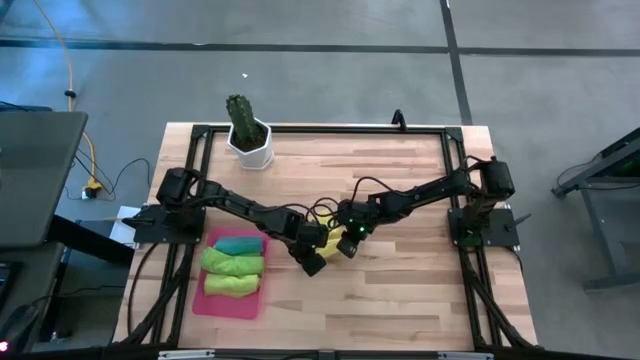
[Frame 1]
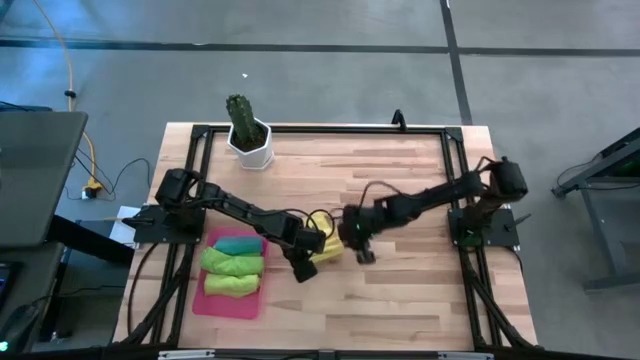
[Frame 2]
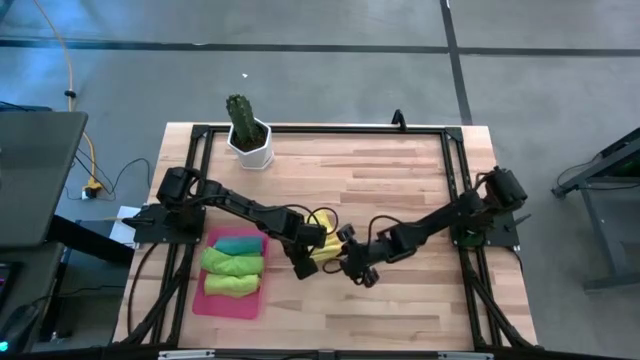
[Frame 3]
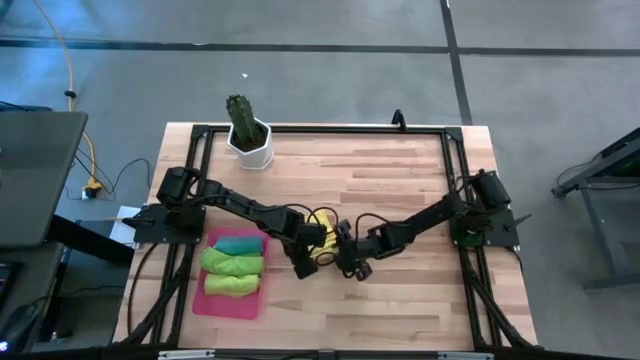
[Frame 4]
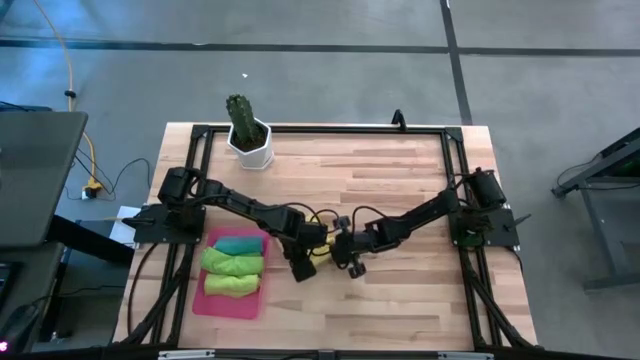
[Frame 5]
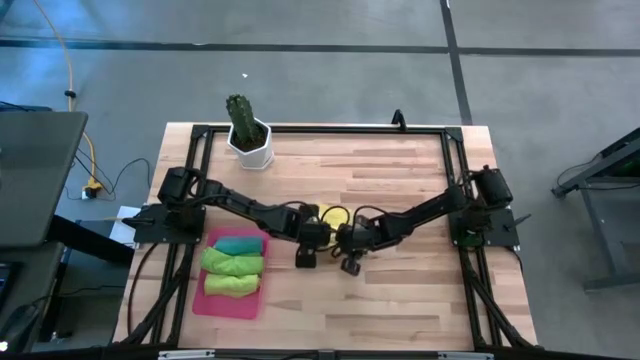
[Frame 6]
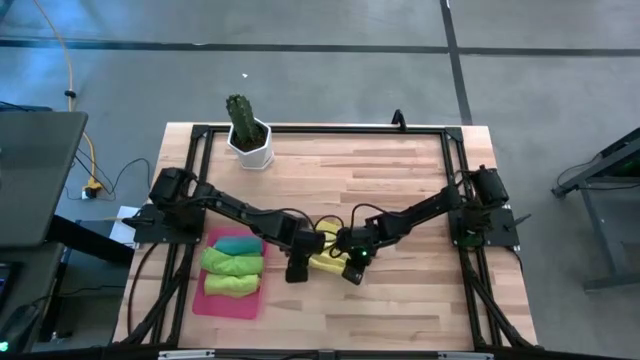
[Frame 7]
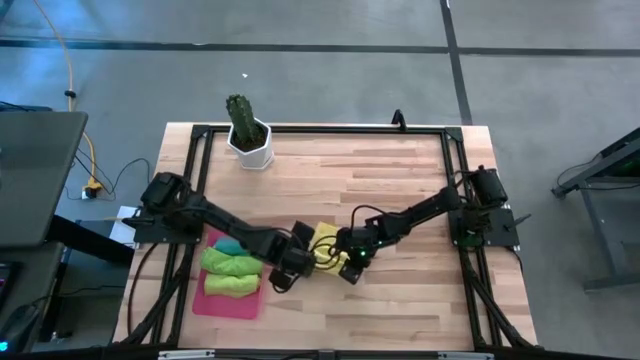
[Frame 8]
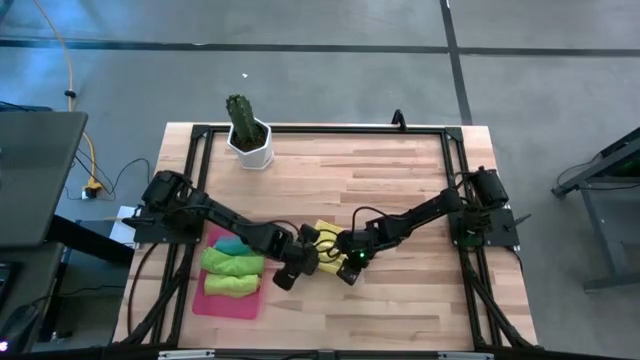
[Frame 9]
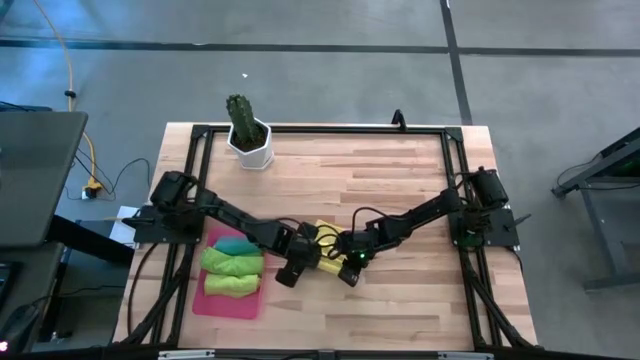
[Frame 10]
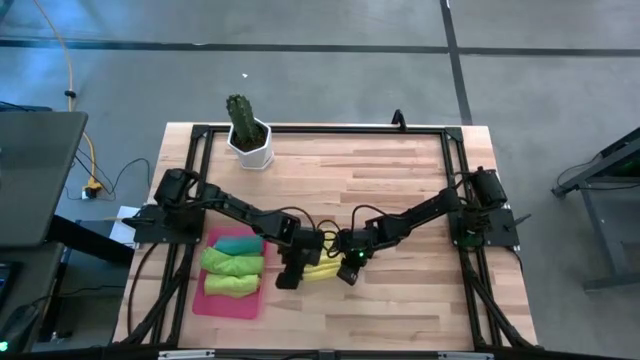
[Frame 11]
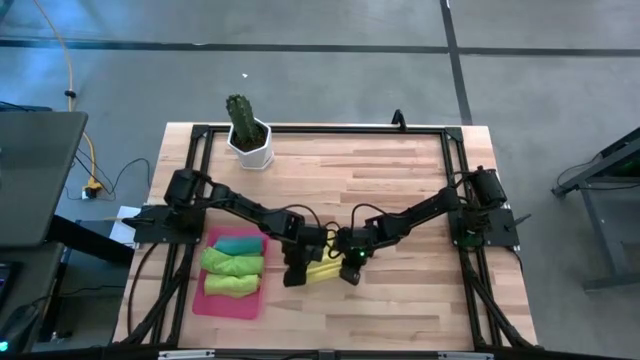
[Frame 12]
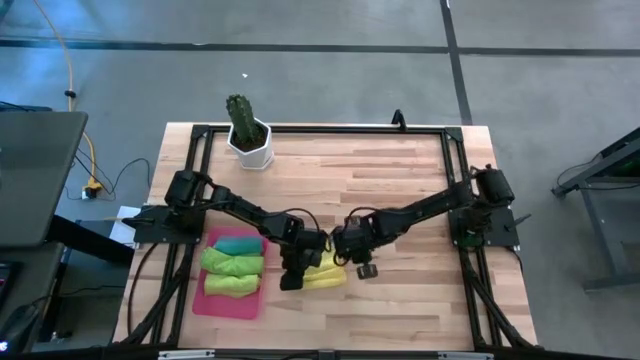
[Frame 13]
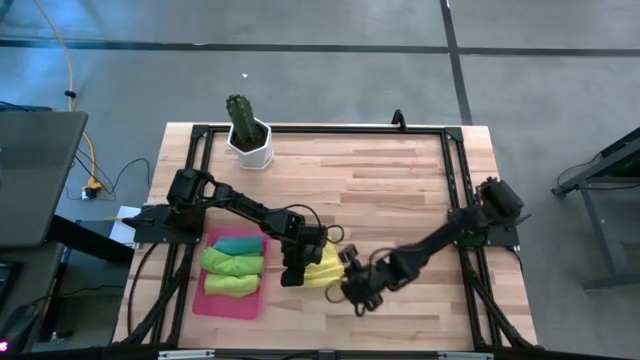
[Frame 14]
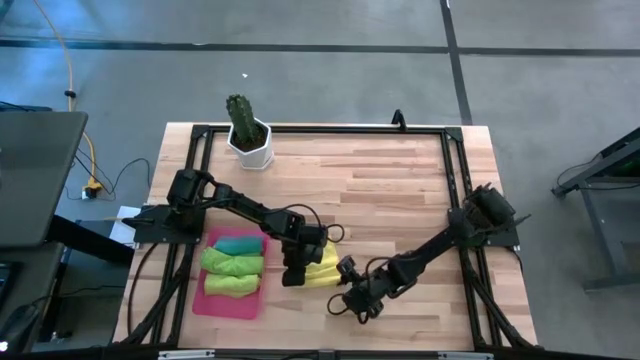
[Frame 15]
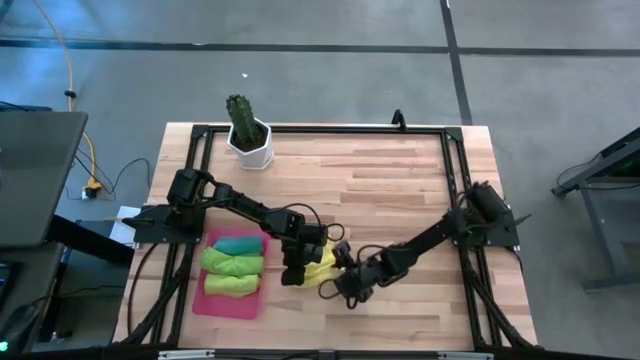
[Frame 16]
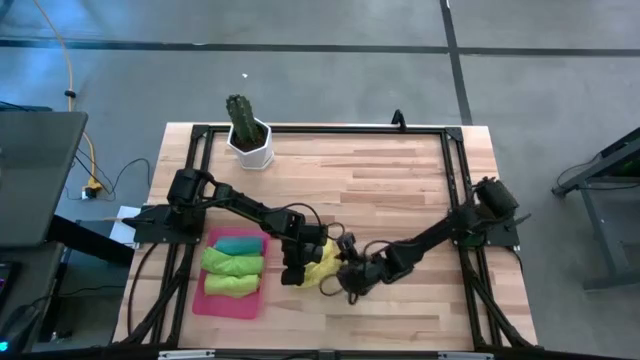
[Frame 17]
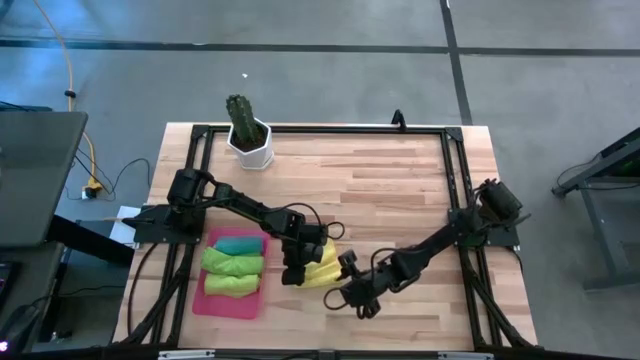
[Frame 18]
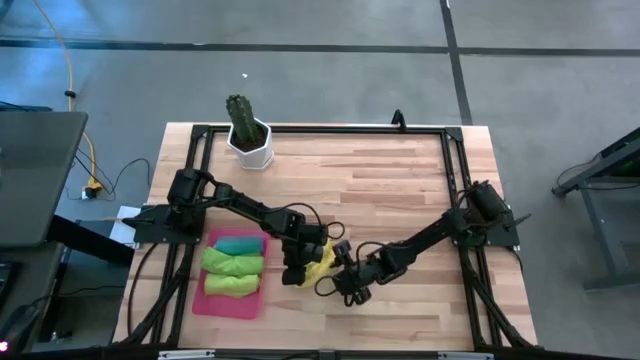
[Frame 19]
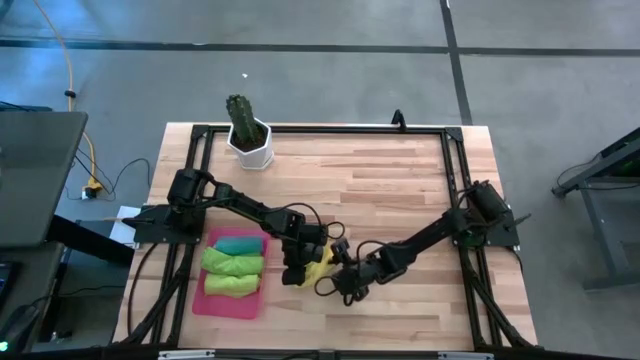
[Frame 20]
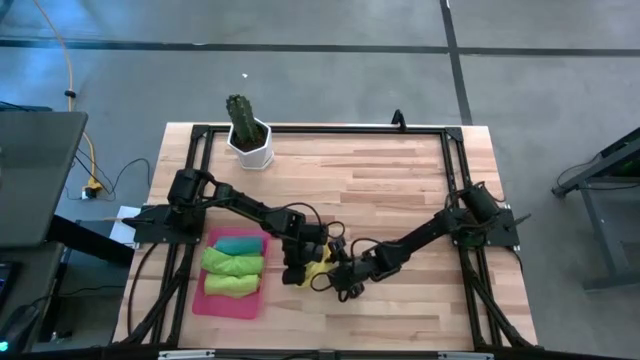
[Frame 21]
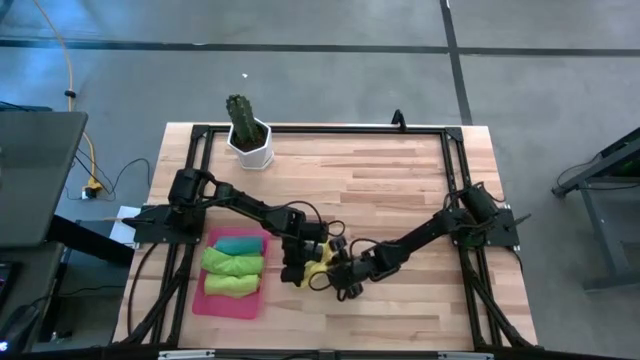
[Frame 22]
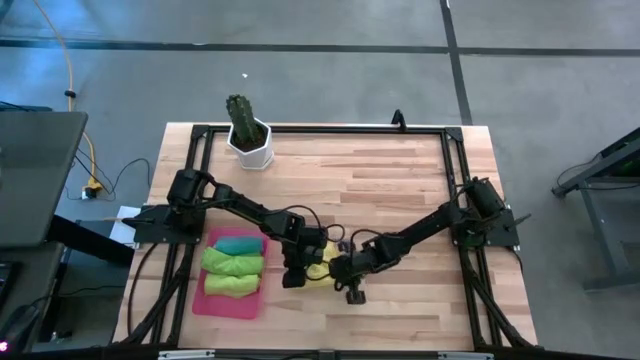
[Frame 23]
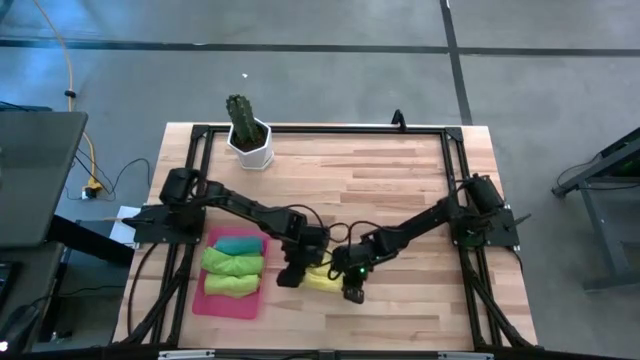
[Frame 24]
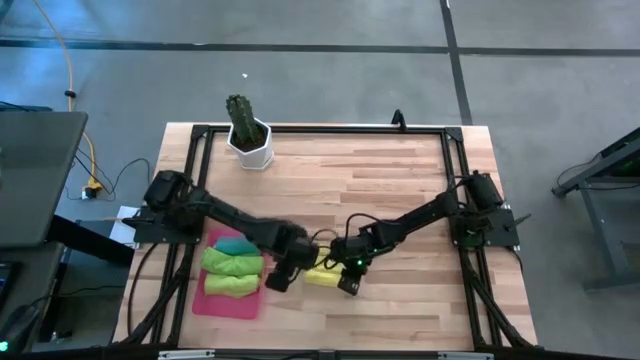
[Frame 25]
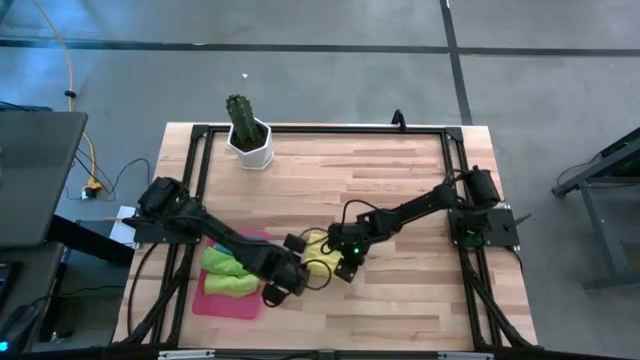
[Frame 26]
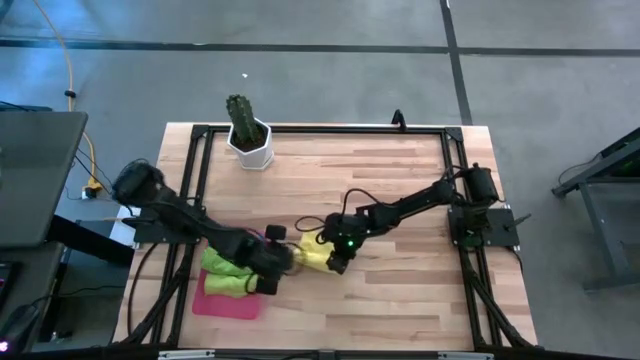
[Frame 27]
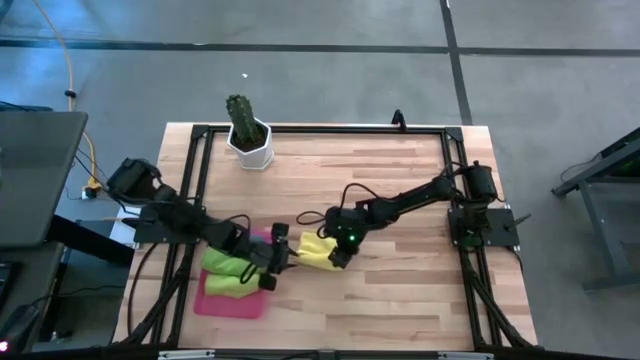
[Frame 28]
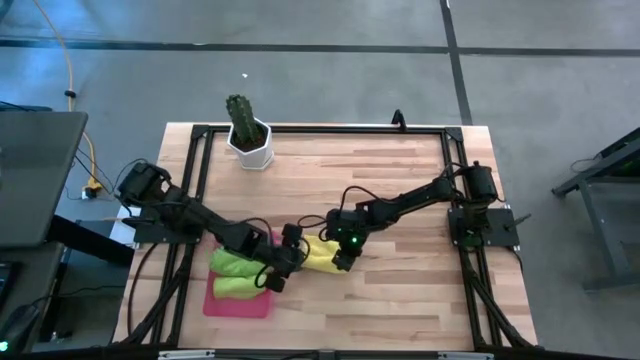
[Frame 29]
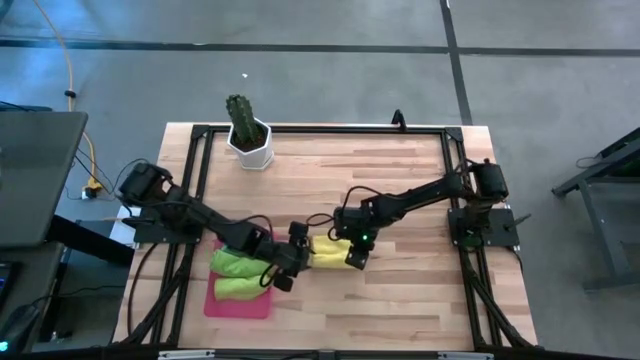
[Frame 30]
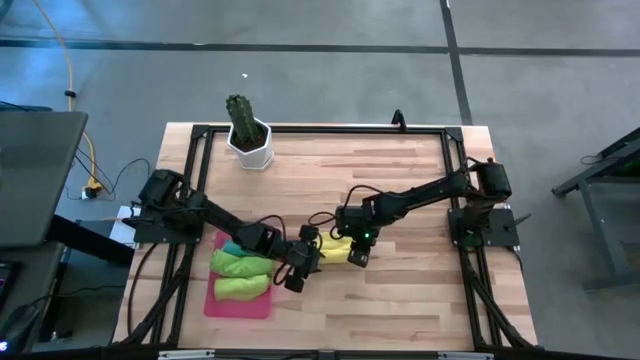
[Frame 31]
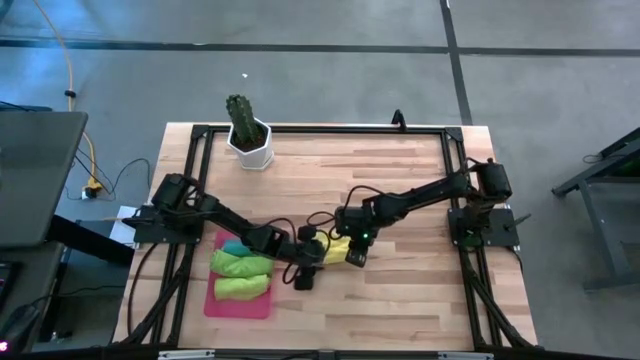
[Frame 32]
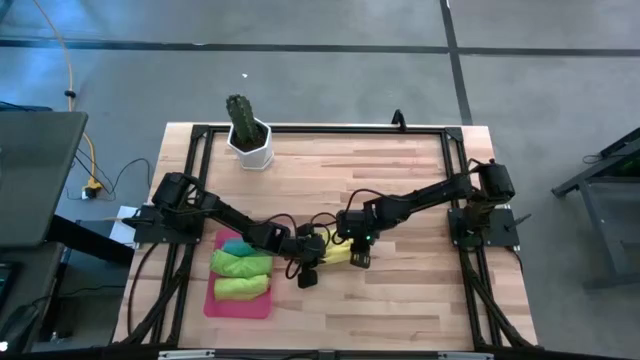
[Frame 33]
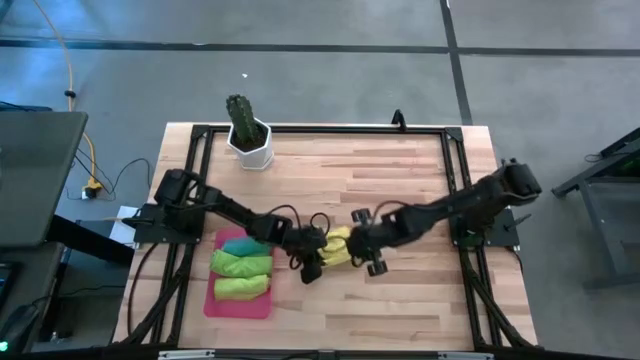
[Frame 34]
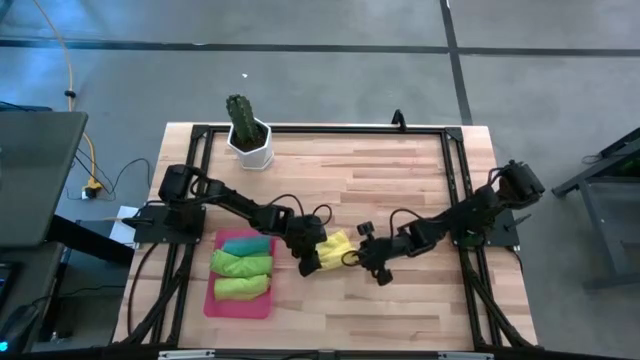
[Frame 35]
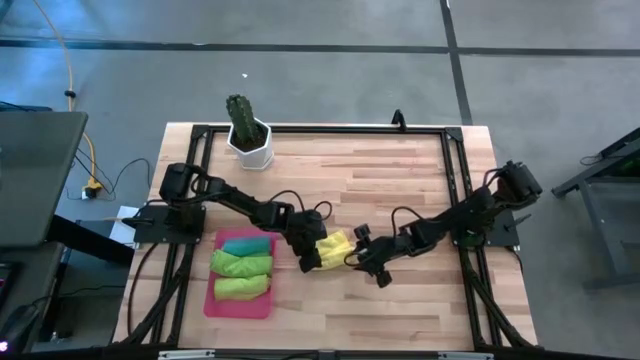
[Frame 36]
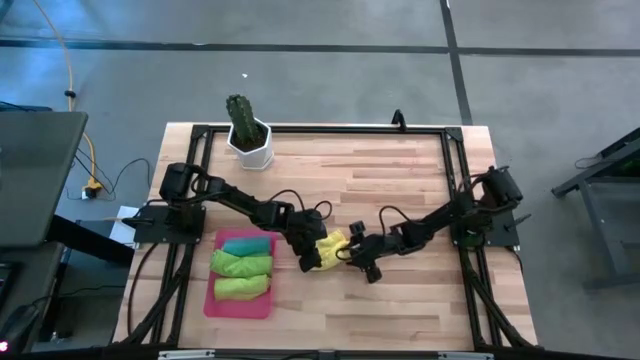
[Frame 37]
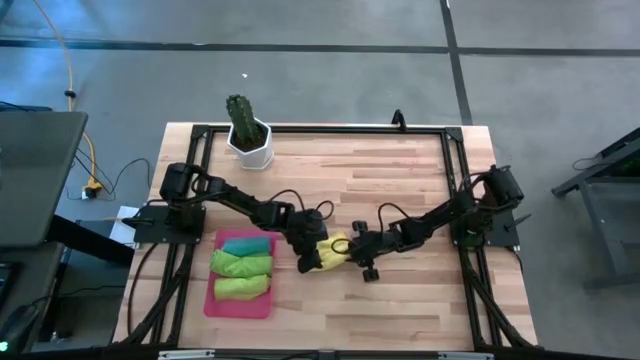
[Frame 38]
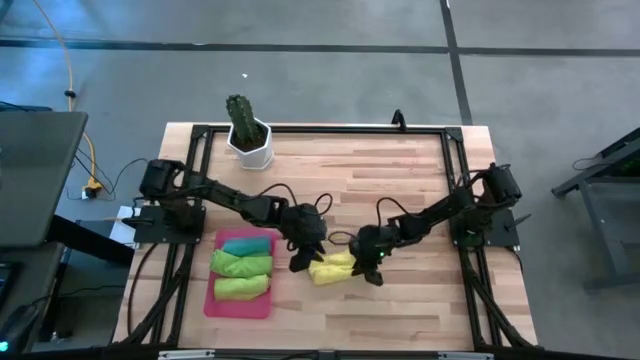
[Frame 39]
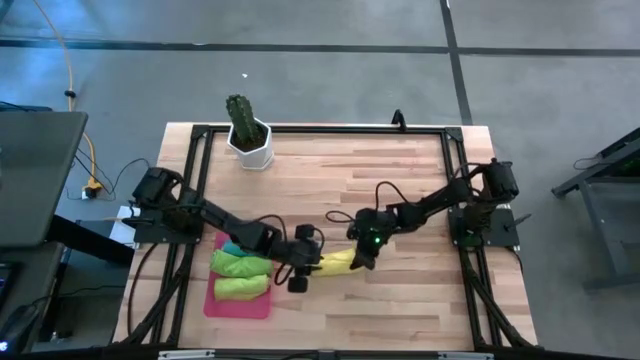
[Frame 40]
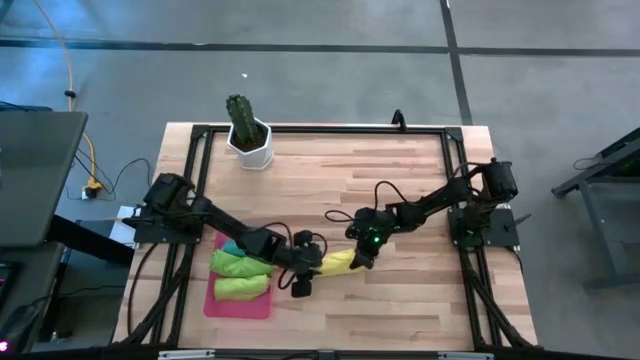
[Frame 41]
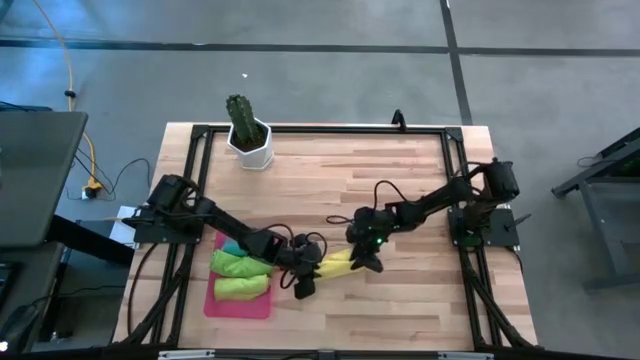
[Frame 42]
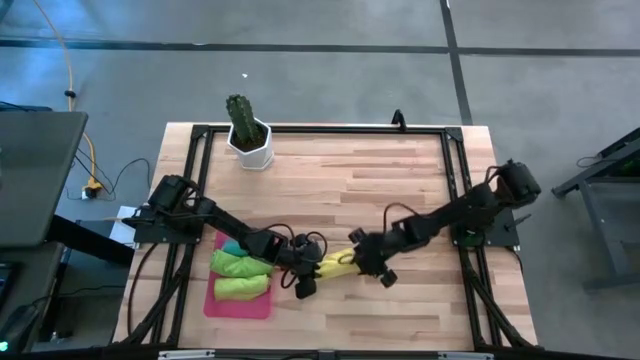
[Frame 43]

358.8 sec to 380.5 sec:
Task: Roll microfiber towels into tight, uniform cylinder then place into a basket
Roll the yellow towel
